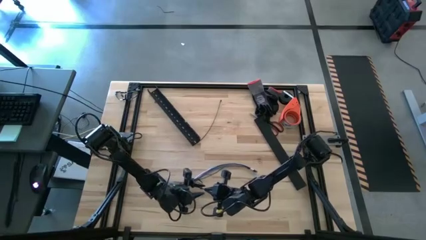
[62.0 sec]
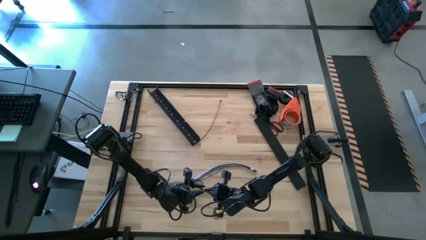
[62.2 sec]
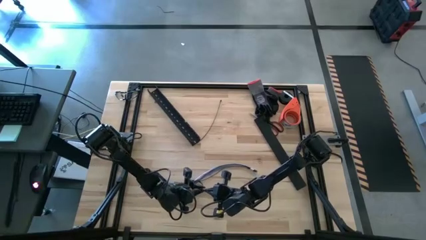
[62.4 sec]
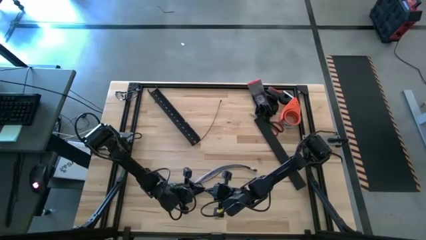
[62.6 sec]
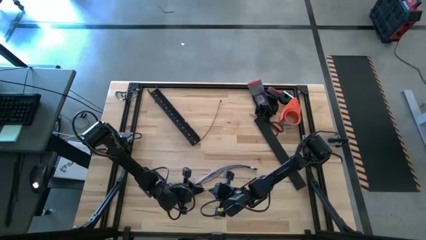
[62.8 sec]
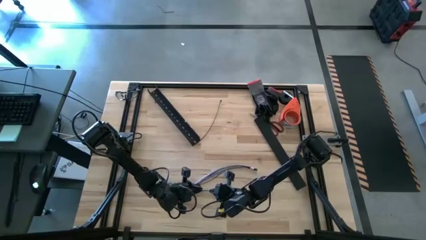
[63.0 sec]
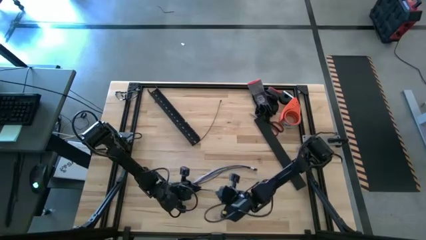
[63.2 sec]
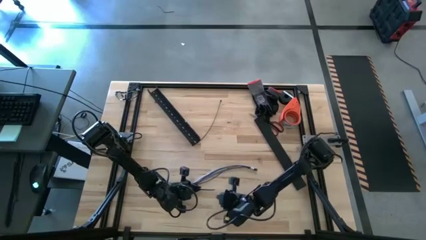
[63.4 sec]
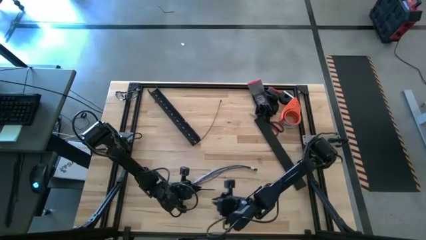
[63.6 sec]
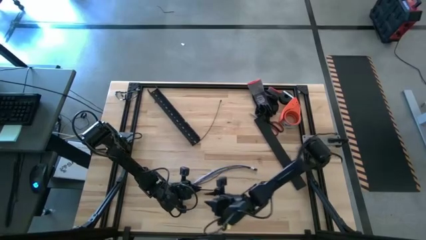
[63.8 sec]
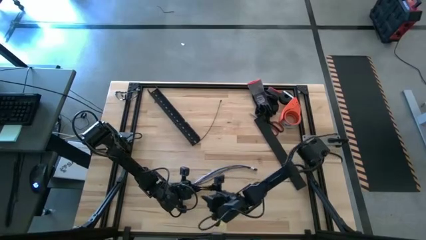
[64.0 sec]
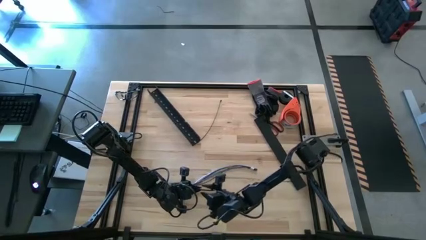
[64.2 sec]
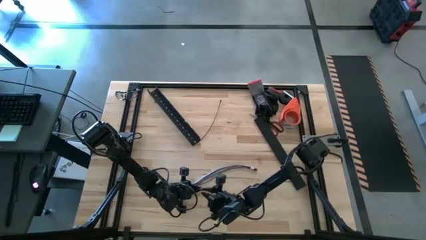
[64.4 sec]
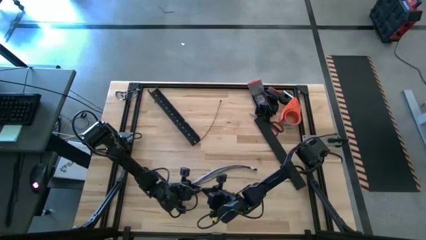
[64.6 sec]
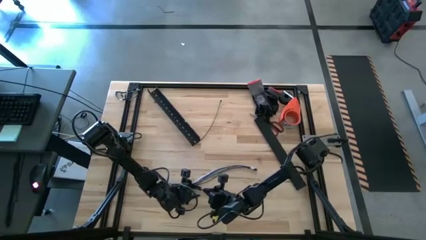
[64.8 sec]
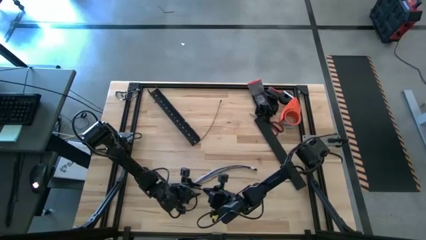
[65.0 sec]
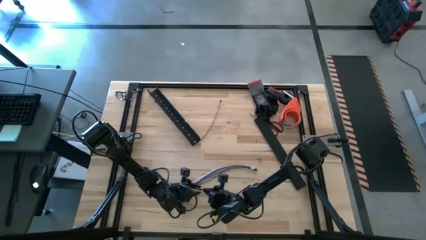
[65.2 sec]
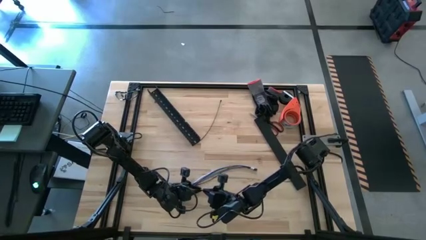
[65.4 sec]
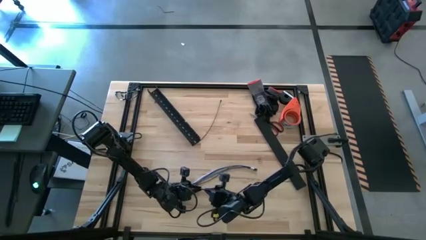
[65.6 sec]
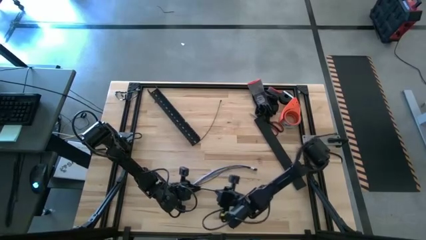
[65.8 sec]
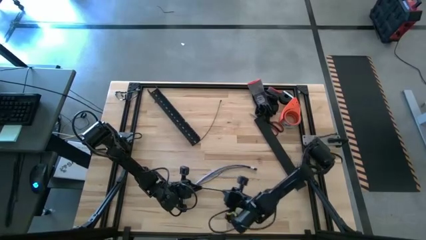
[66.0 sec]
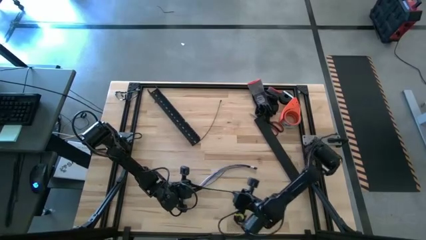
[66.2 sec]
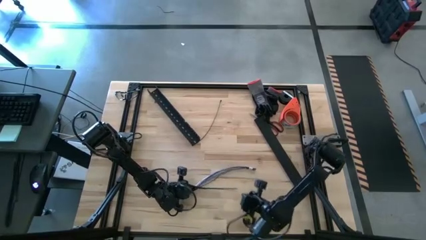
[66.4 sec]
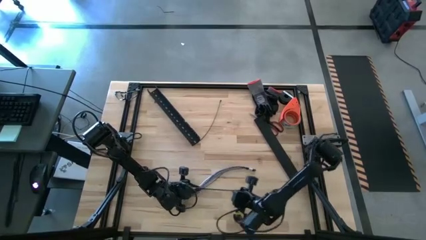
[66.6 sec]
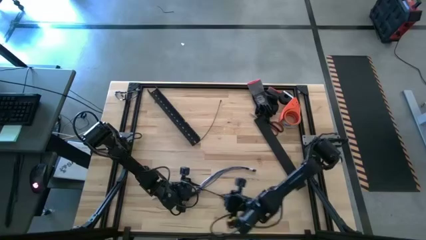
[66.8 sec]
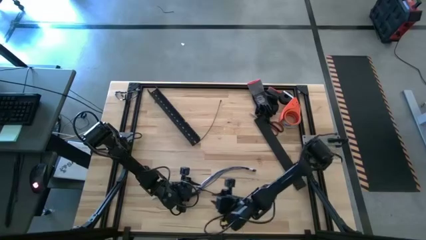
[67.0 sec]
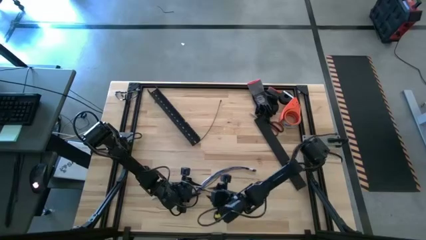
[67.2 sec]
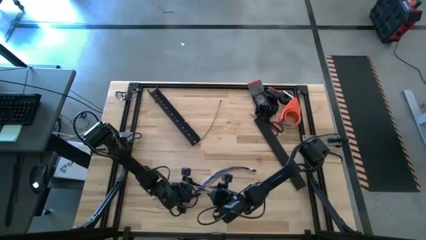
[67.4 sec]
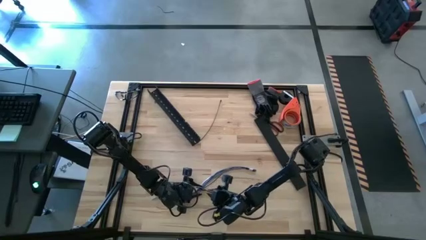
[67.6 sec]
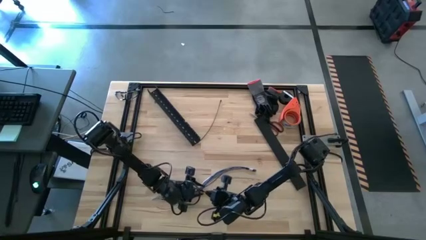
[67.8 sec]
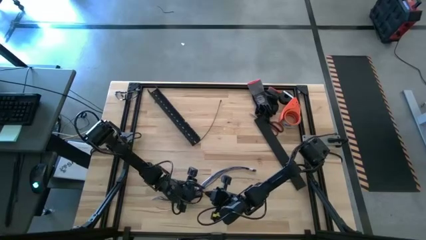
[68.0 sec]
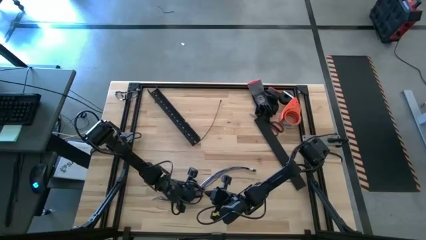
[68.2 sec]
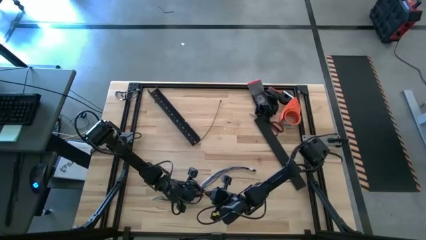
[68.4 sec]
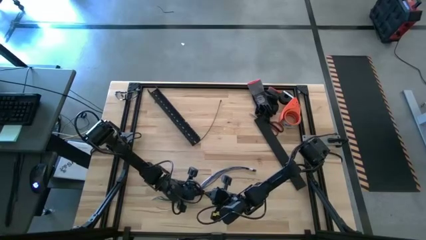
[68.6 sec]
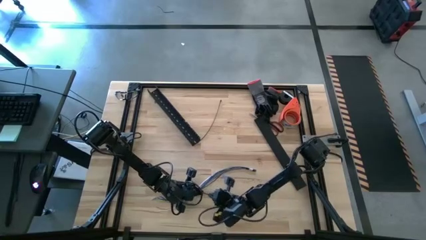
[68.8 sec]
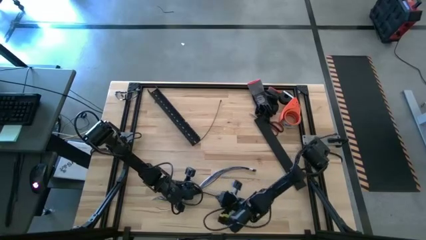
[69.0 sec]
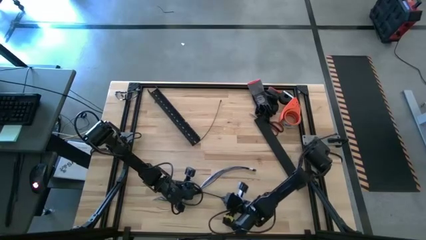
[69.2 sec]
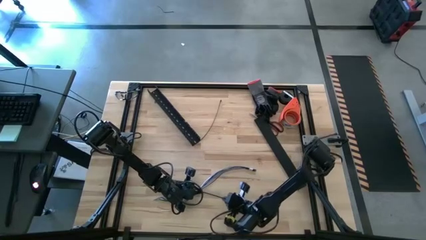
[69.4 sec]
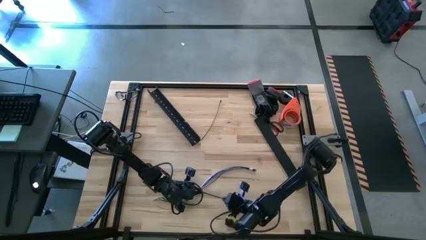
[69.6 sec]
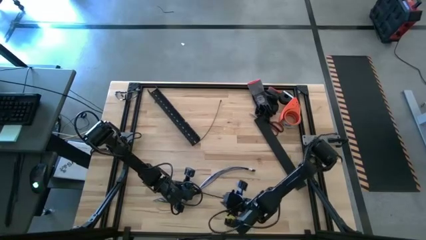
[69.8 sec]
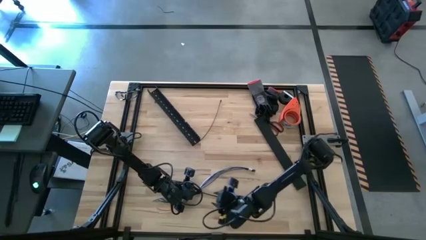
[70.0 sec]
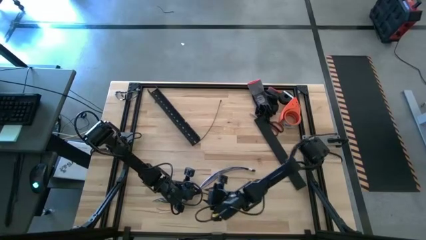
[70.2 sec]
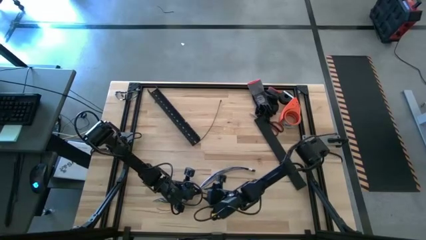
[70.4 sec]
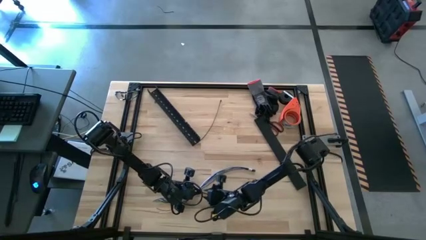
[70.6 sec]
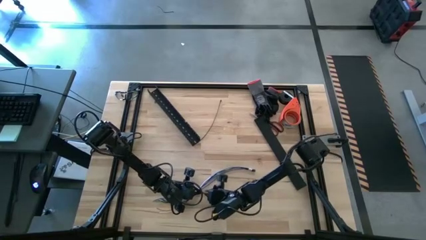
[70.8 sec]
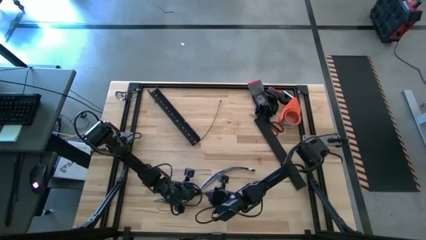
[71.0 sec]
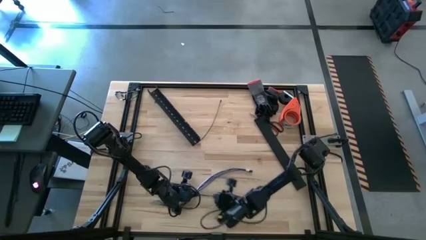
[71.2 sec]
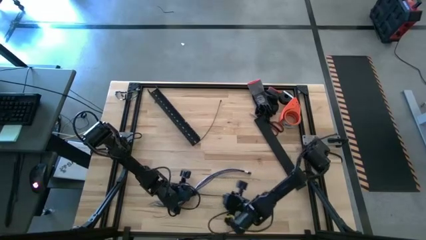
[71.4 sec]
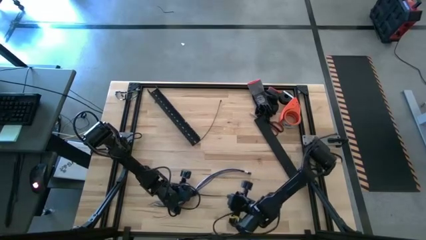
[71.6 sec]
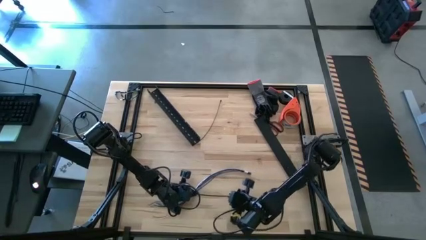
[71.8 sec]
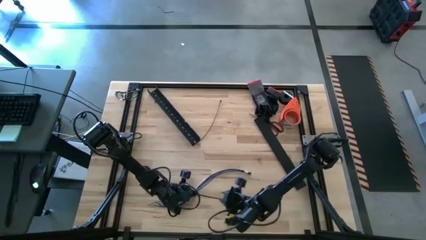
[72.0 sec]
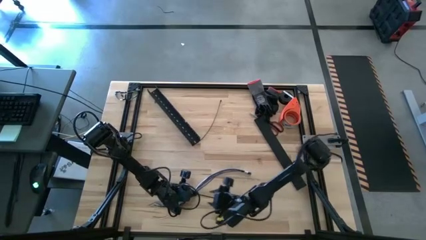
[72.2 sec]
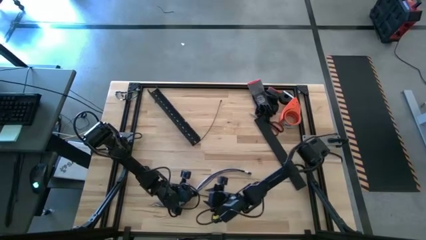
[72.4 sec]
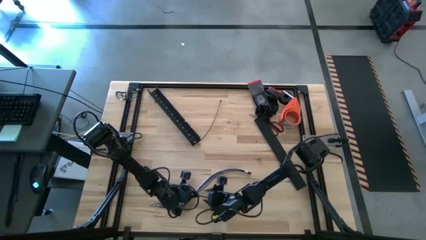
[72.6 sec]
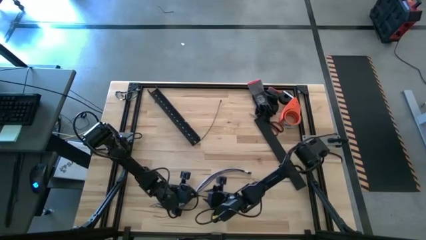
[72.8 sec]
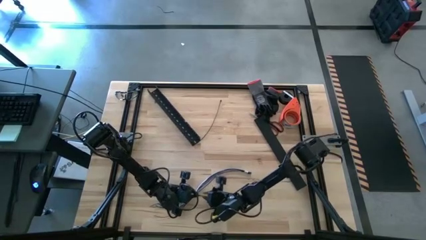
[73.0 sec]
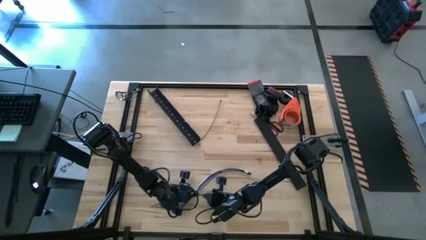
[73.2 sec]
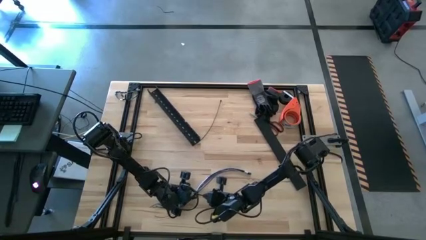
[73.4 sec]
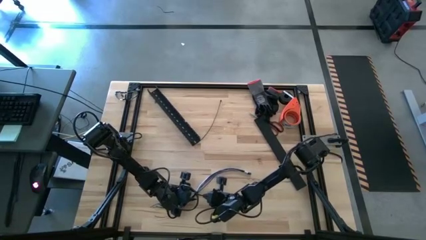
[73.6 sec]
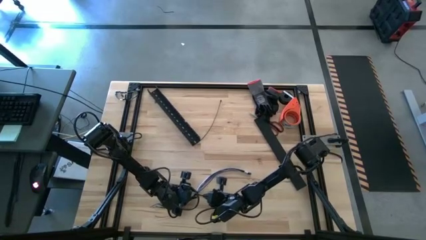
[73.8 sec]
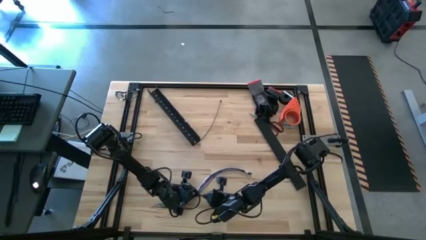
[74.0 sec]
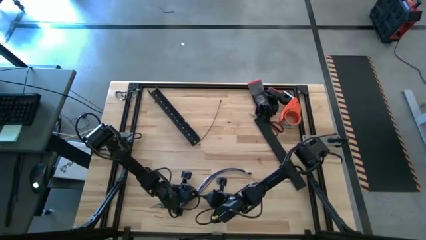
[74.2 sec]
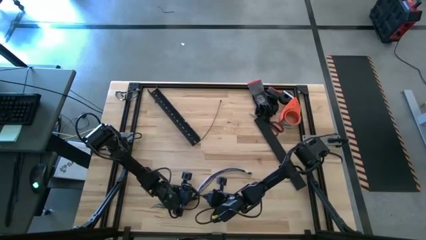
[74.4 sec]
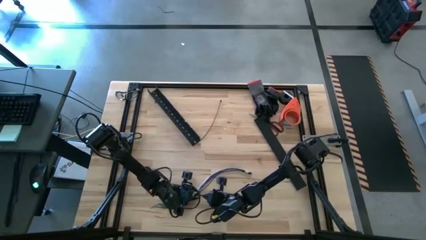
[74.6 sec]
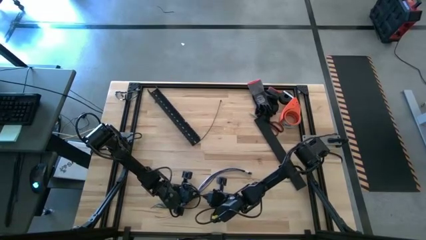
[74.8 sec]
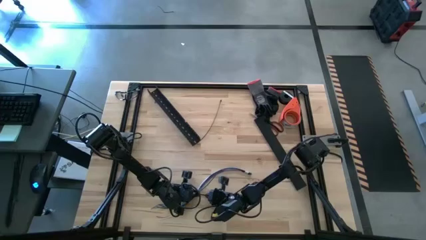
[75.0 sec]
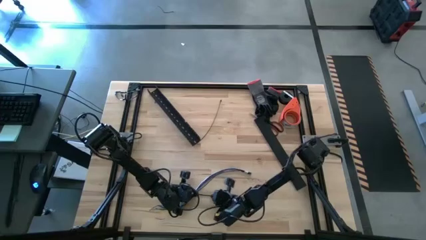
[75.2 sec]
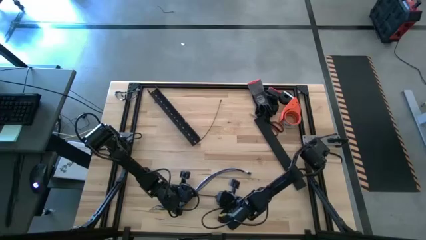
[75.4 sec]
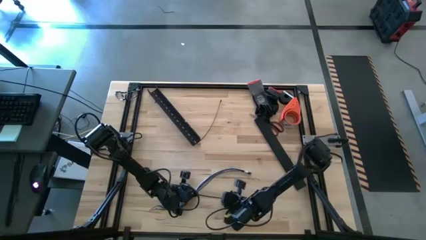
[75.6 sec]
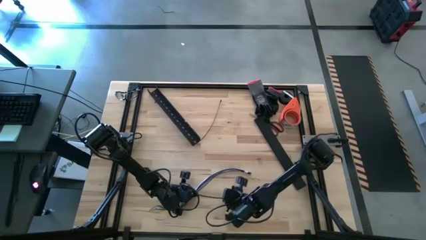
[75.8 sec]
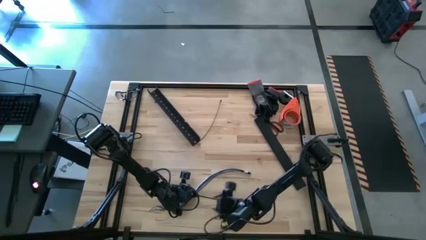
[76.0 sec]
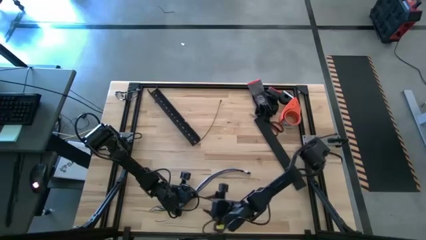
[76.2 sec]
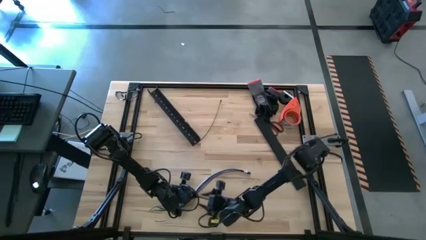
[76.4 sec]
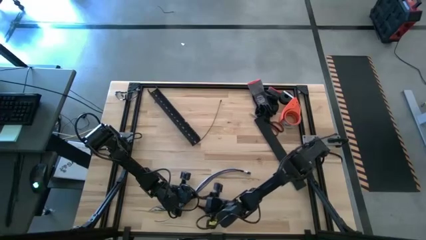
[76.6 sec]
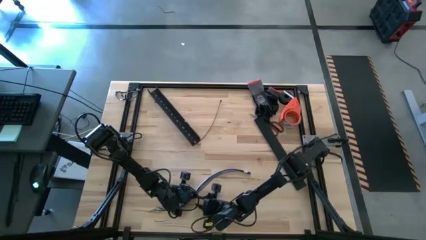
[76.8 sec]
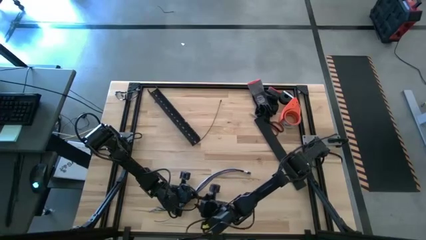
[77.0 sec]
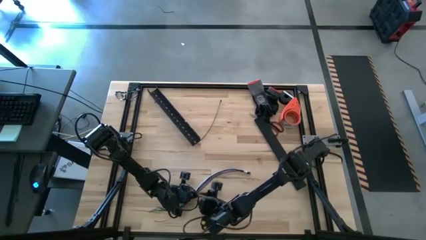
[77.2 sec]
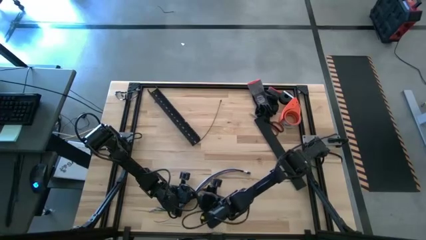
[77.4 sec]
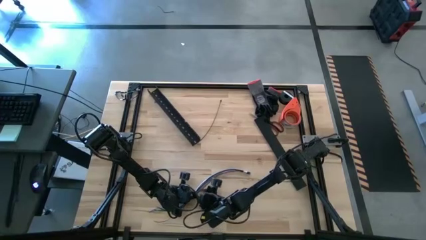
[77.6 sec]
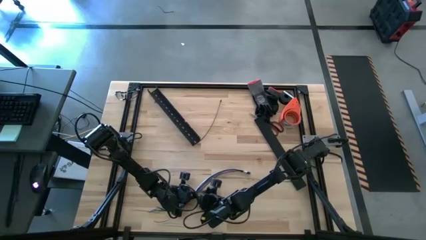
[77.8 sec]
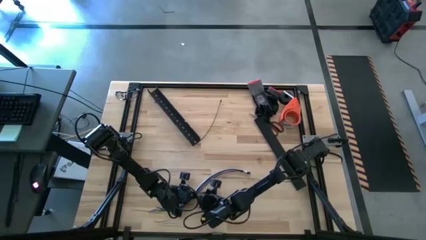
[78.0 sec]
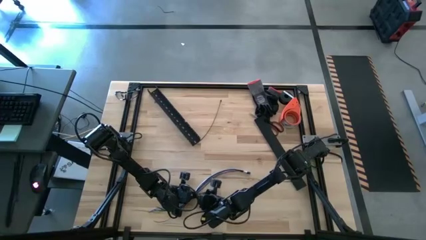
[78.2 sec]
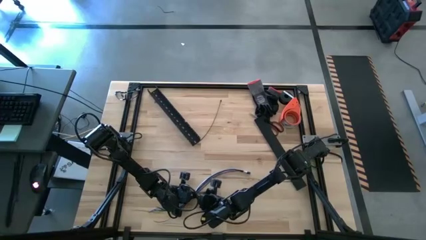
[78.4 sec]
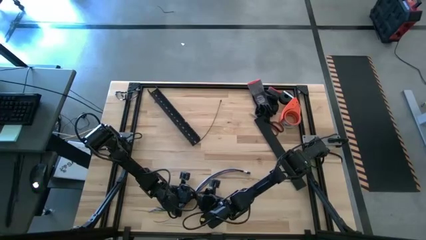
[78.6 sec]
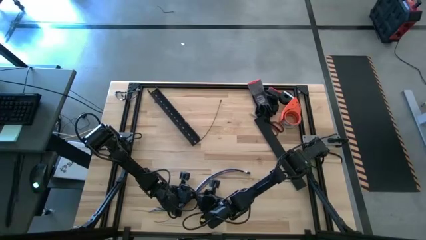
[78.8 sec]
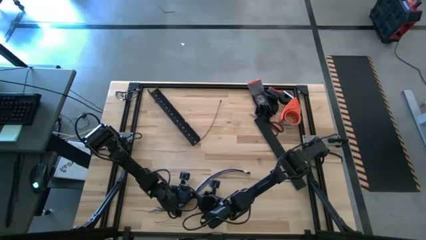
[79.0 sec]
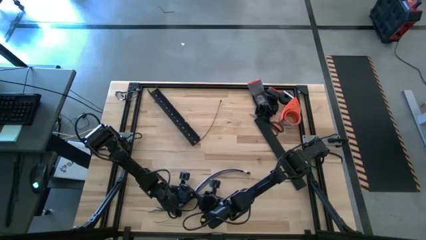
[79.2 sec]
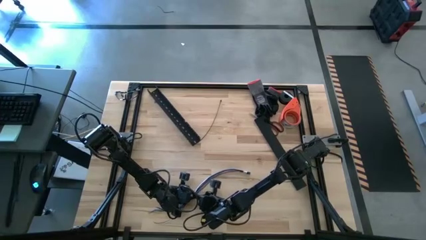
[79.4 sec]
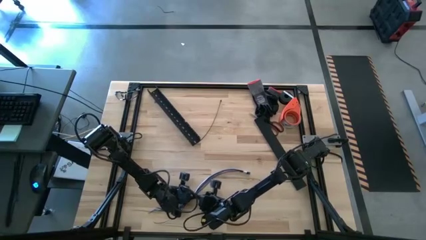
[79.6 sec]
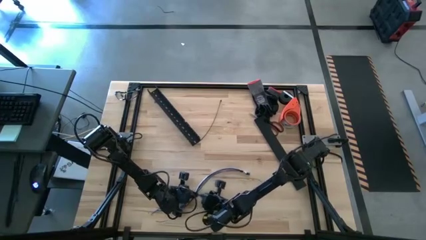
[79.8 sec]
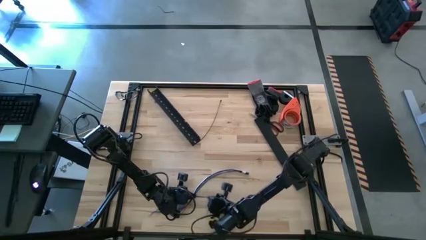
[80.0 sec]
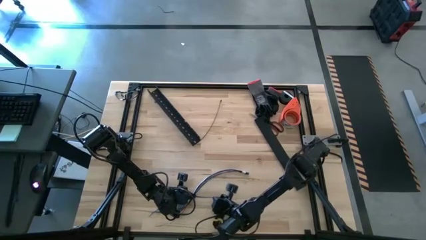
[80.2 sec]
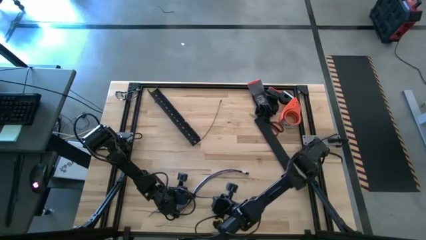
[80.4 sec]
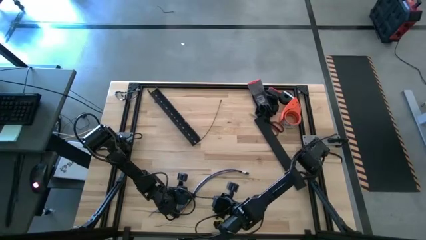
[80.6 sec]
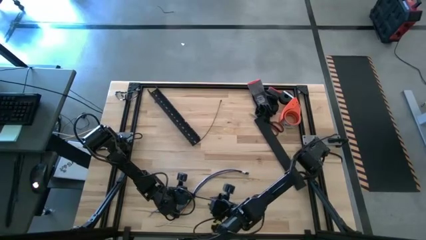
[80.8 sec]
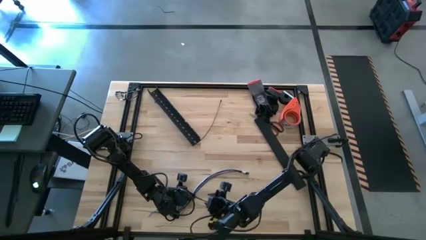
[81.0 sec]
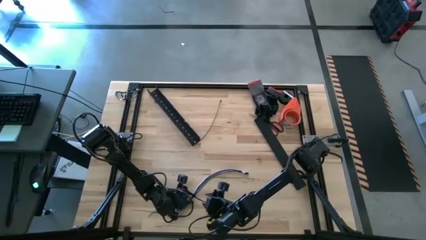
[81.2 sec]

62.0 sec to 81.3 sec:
Task: Ziptie cables
Wrap the cable wires with the black zip tie
